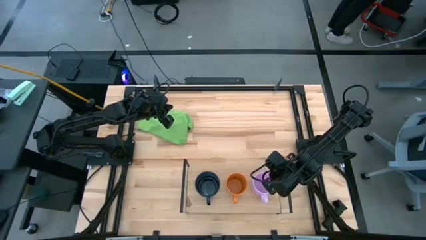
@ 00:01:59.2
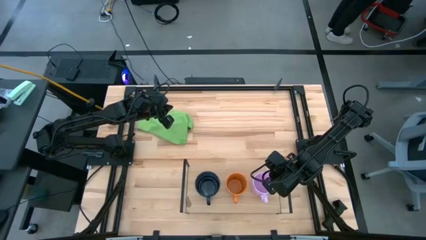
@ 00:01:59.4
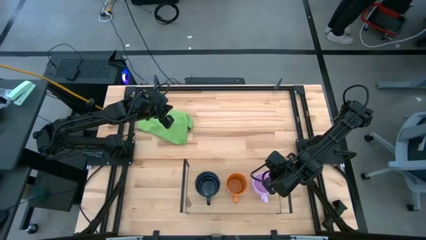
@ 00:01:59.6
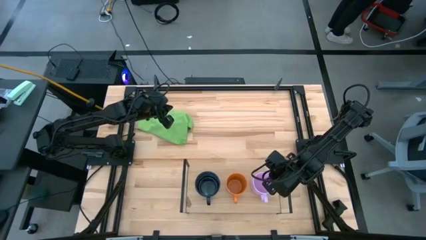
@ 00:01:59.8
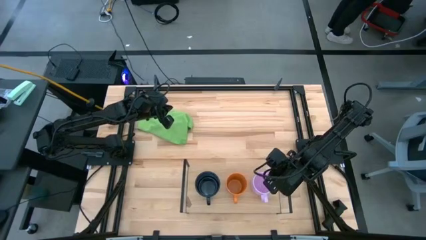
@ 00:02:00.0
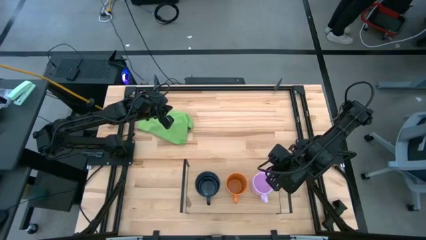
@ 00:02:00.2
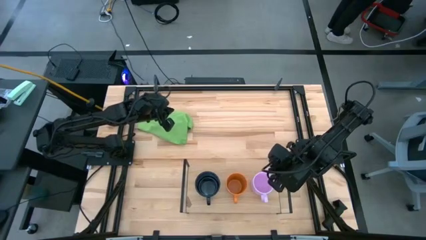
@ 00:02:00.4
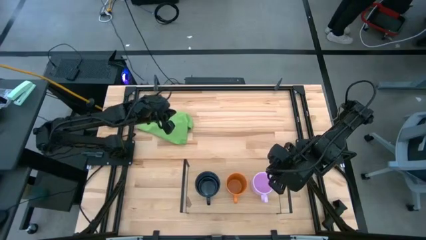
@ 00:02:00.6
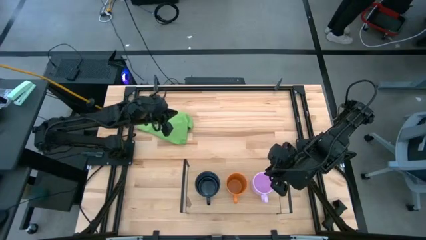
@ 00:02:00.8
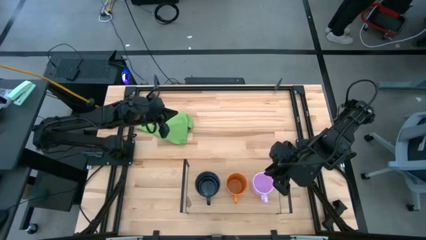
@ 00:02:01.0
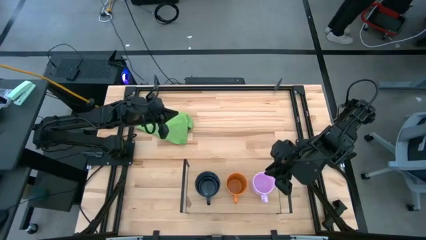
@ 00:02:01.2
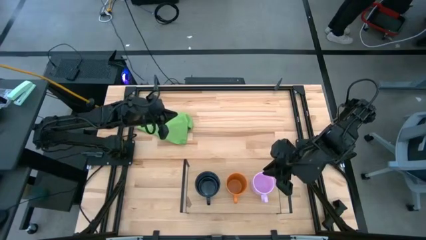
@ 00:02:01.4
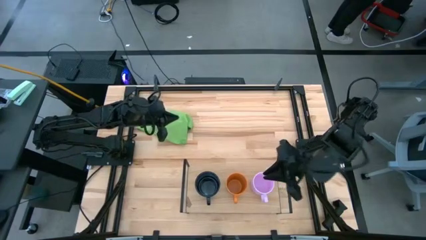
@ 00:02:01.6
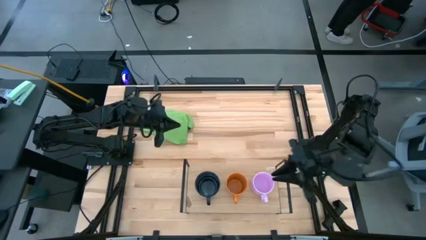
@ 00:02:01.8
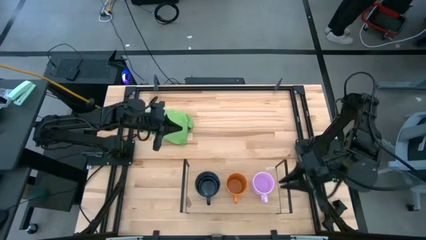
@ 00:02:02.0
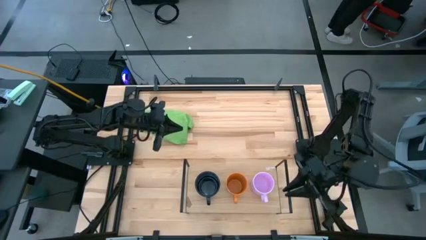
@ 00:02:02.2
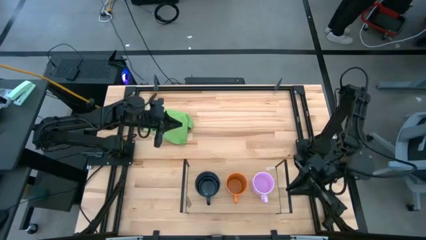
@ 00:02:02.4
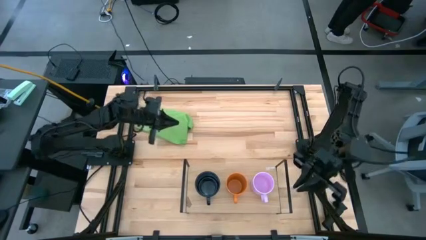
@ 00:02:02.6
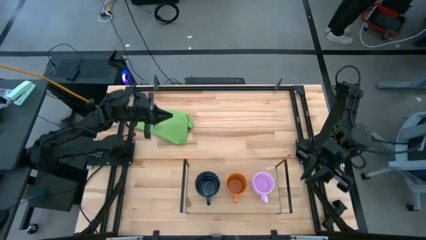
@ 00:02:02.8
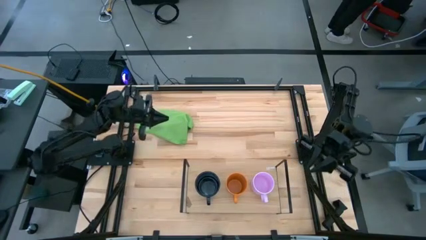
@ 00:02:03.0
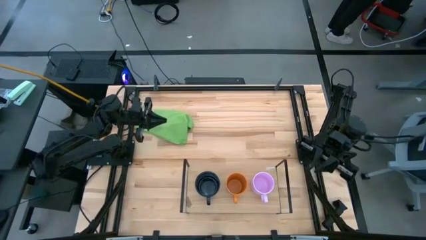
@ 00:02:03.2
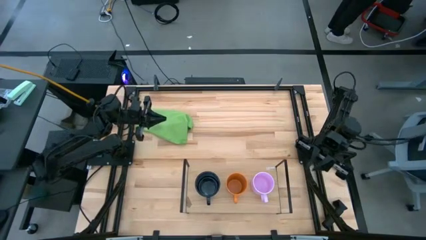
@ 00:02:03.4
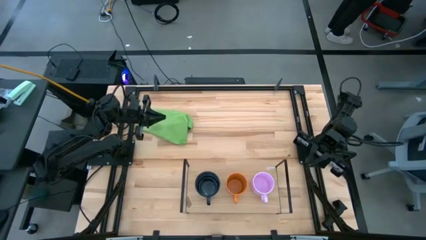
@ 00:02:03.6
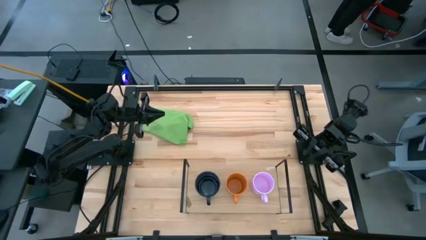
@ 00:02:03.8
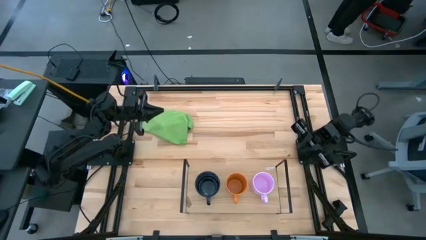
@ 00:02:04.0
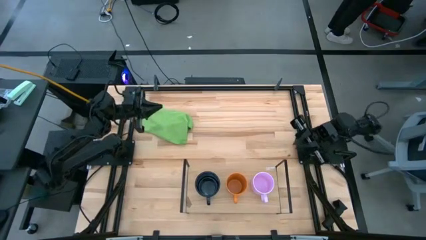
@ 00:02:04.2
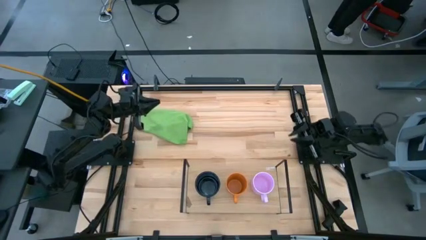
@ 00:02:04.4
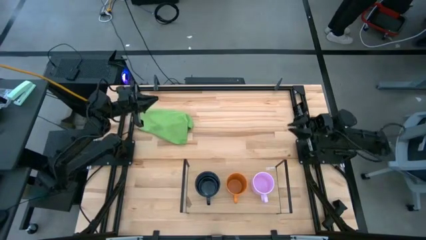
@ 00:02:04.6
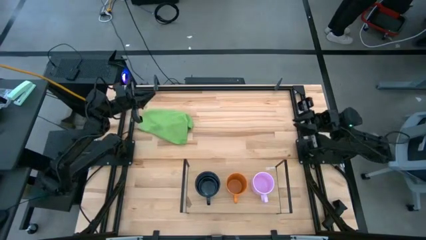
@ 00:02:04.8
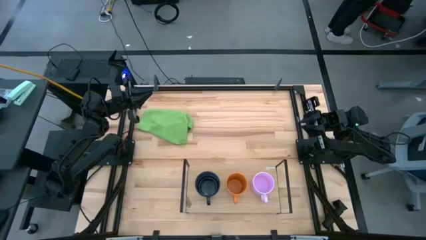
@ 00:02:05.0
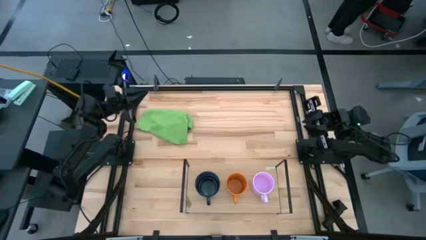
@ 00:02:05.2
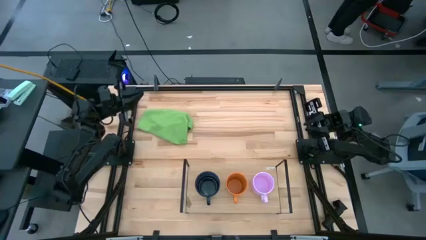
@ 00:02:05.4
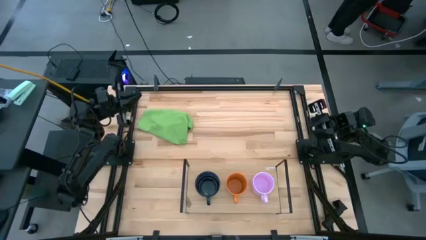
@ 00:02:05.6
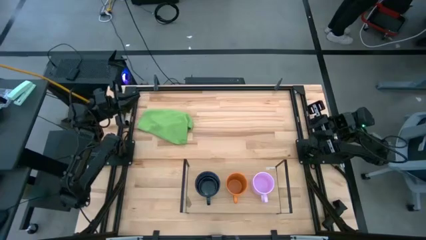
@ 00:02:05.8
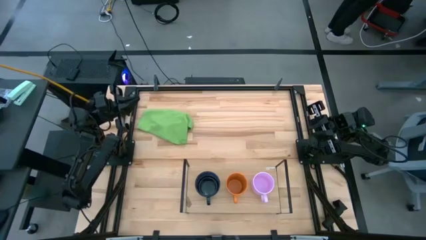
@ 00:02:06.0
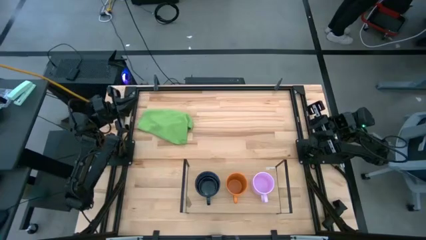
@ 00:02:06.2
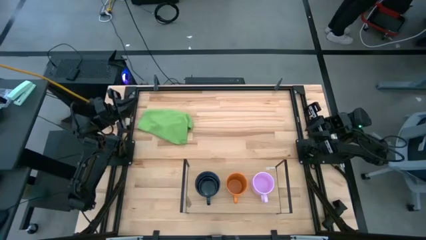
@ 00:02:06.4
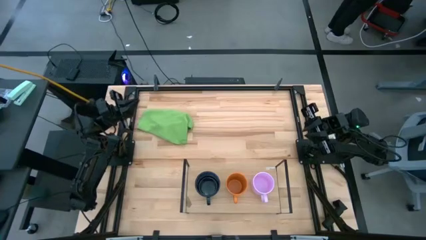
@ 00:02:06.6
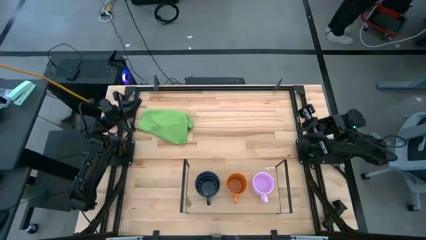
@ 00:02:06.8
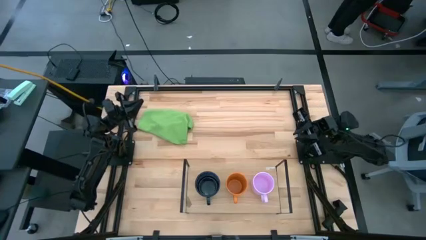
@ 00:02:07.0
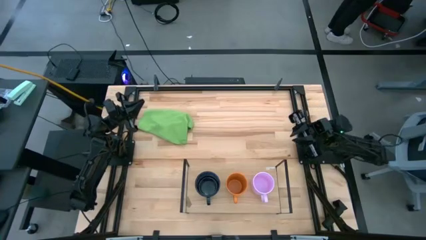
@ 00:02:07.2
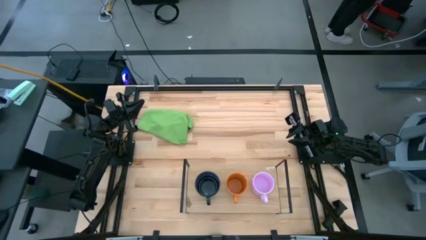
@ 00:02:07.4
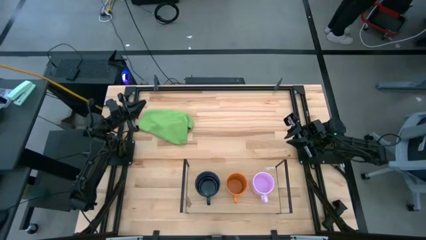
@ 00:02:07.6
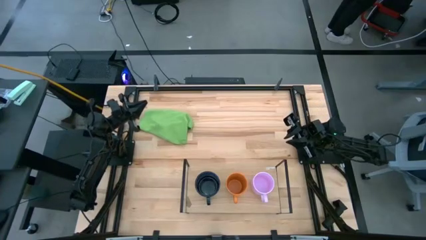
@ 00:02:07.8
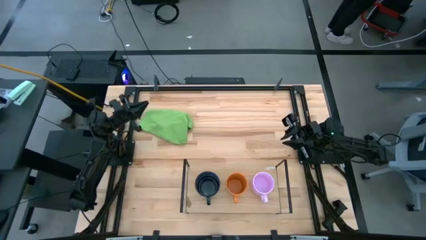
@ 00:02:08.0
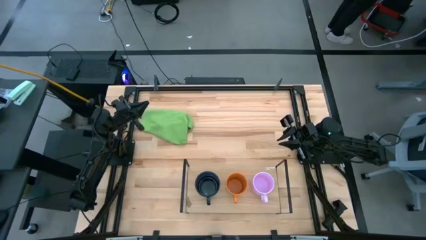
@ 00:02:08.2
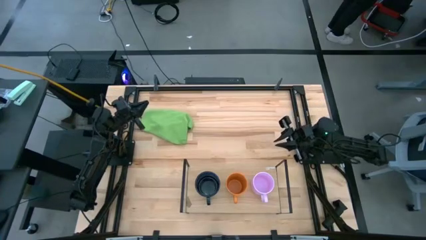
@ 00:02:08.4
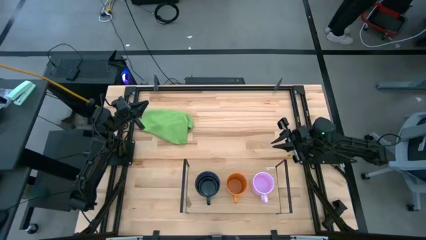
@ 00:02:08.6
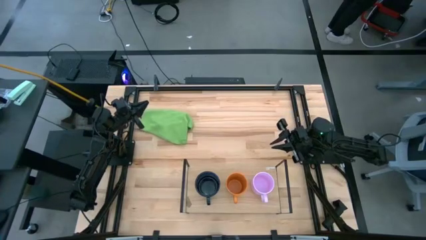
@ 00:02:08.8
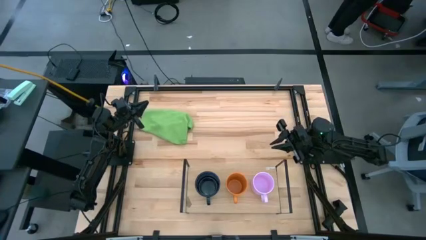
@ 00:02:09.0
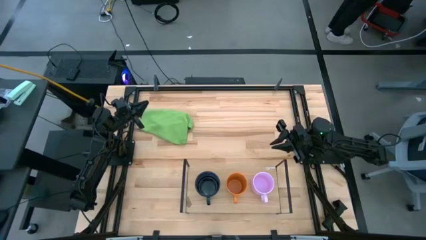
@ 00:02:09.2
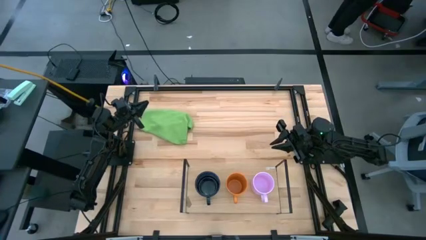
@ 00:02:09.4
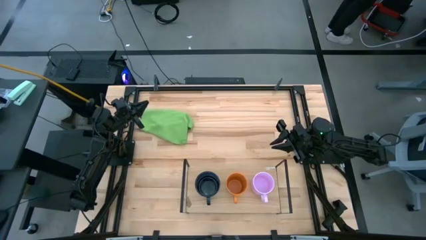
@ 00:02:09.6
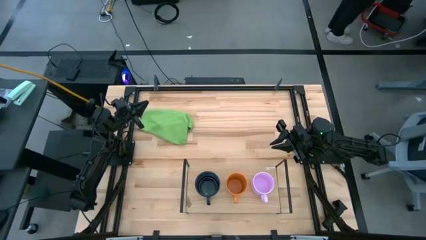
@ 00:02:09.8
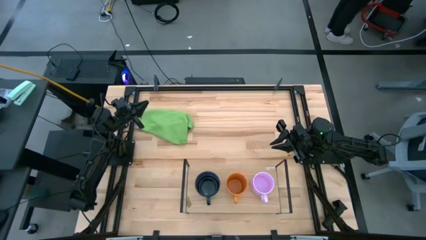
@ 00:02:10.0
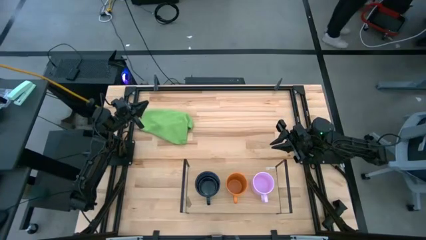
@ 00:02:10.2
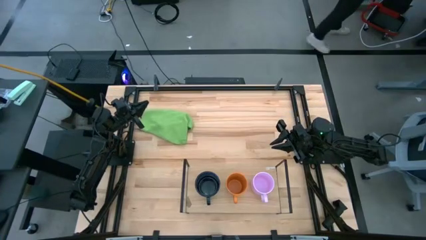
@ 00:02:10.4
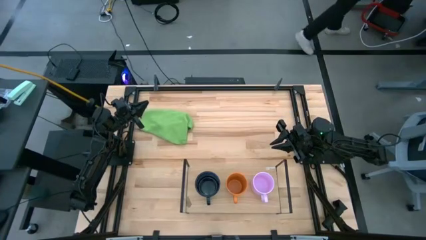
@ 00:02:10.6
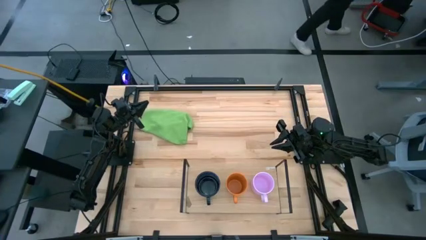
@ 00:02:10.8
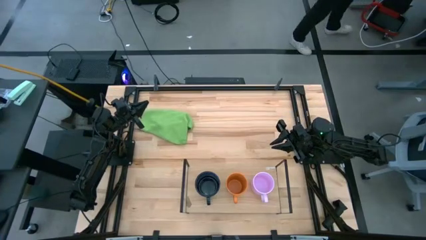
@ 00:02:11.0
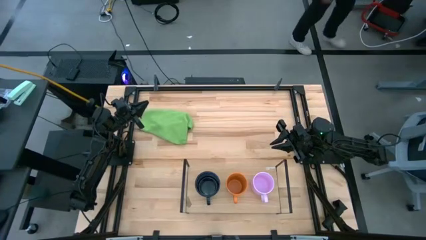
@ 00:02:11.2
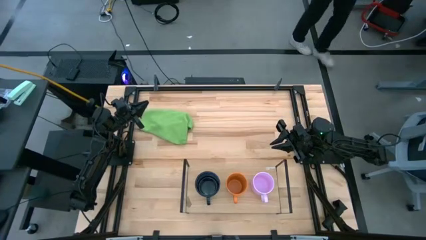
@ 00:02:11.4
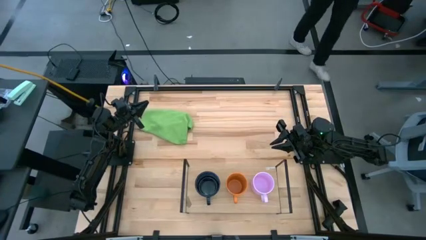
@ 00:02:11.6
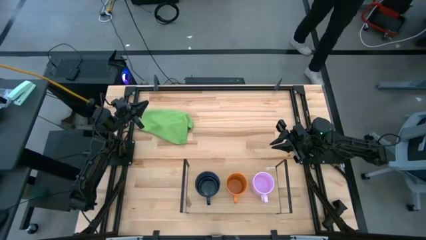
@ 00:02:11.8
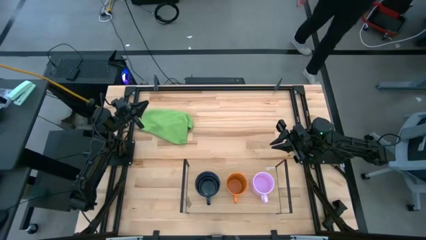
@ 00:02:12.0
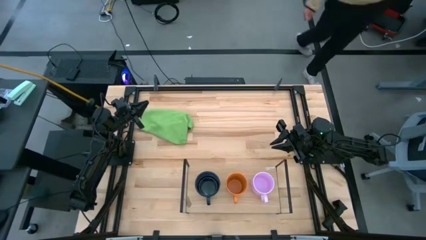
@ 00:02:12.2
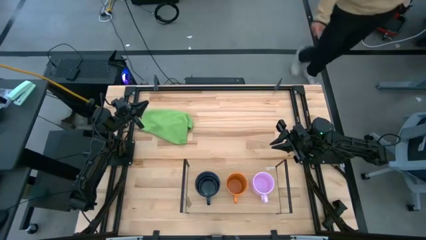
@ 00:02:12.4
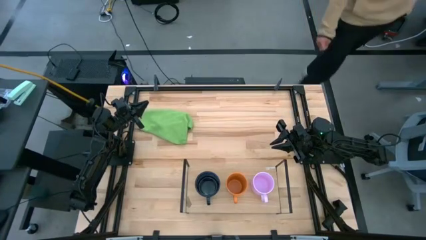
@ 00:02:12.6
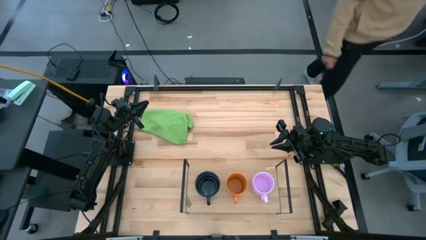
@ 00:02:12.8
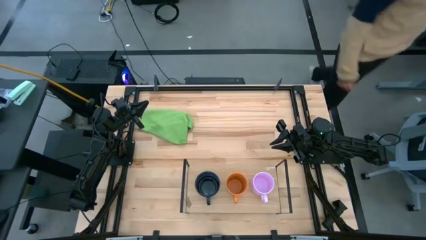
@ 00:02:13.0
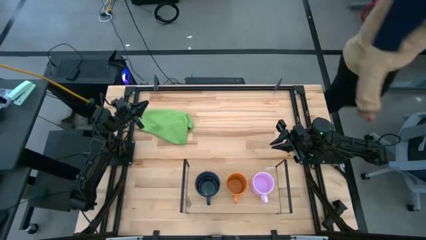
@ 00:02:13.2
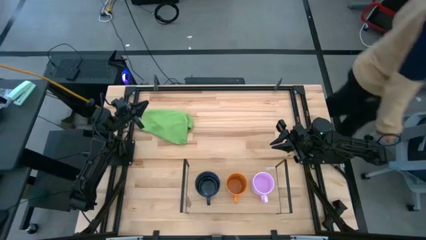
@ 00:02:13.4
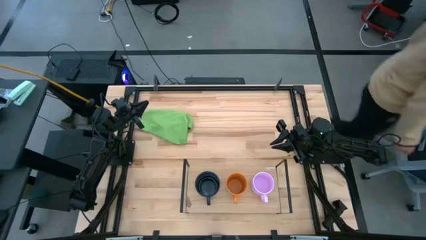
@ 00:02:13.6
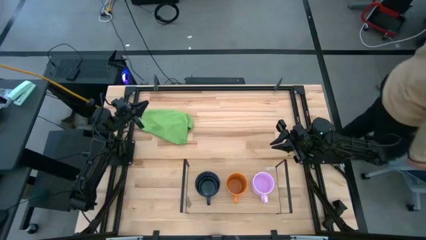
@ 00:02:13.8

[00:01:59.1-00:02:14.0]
Task: Stack small to large cups/mugs on shelf
Return to Home Position
